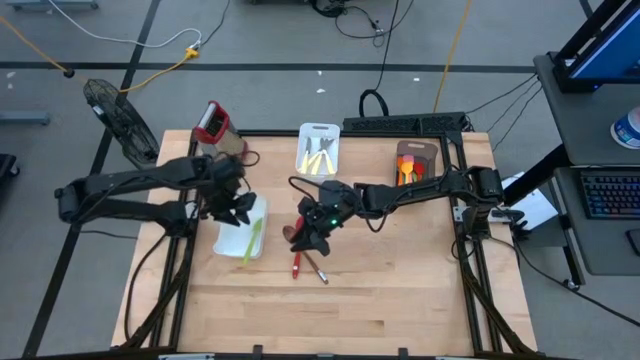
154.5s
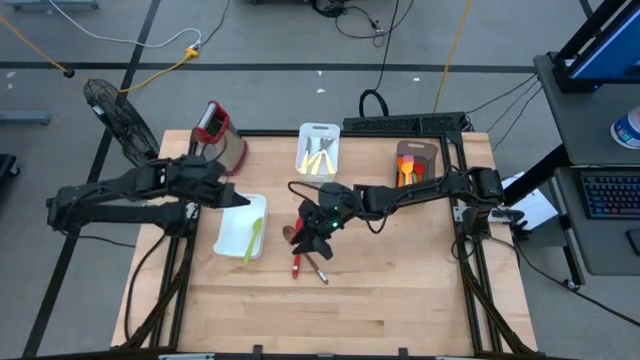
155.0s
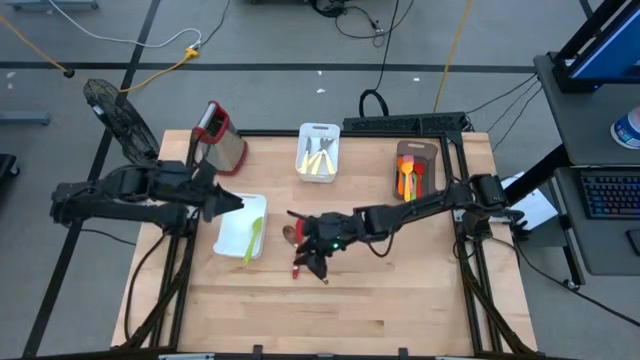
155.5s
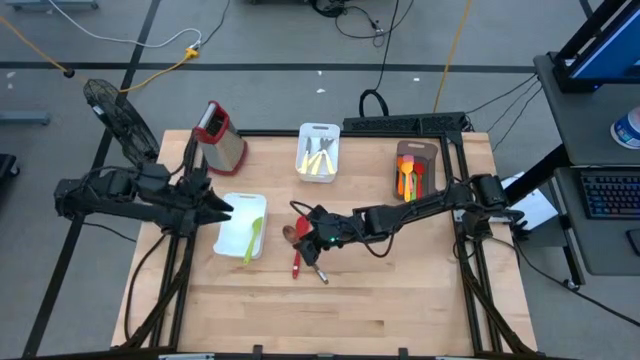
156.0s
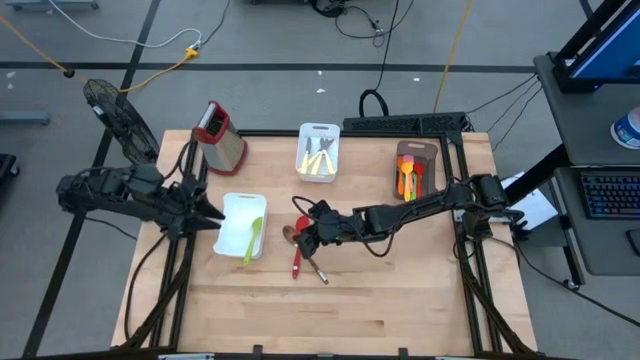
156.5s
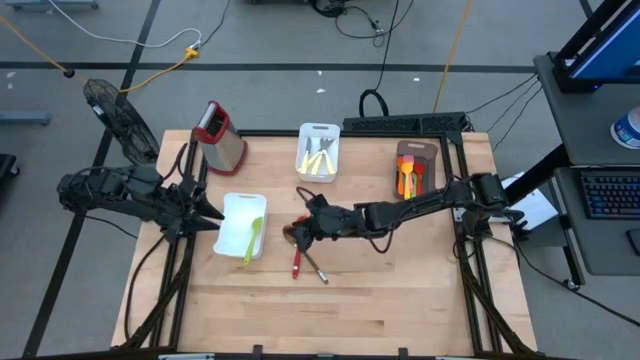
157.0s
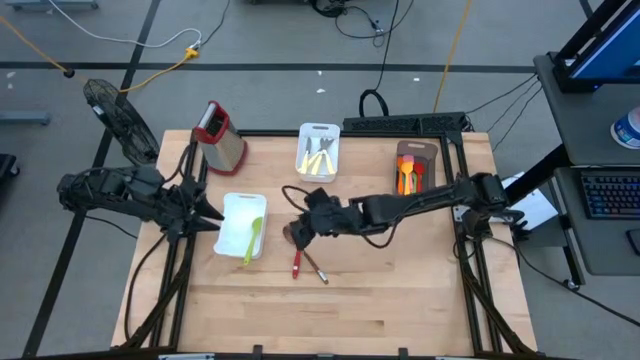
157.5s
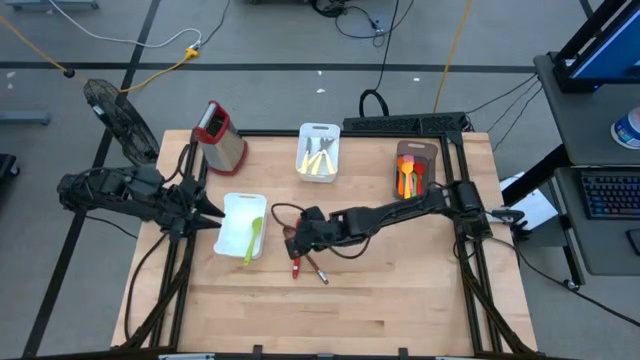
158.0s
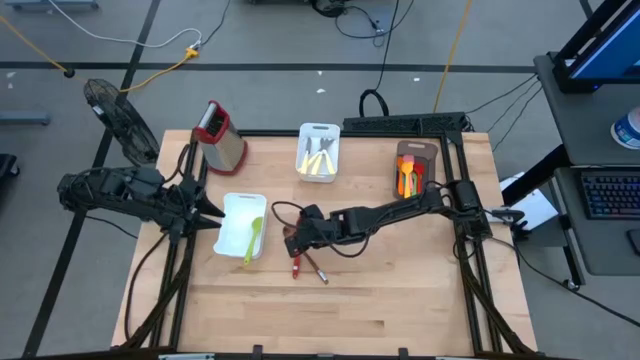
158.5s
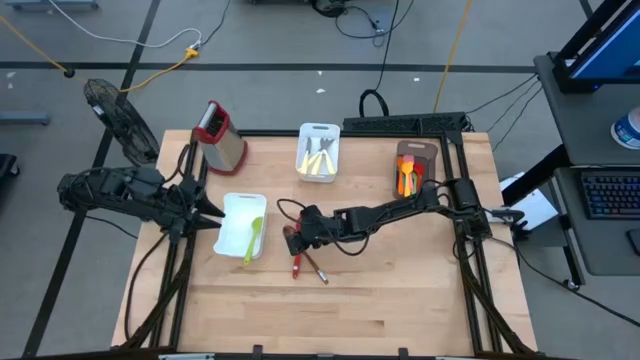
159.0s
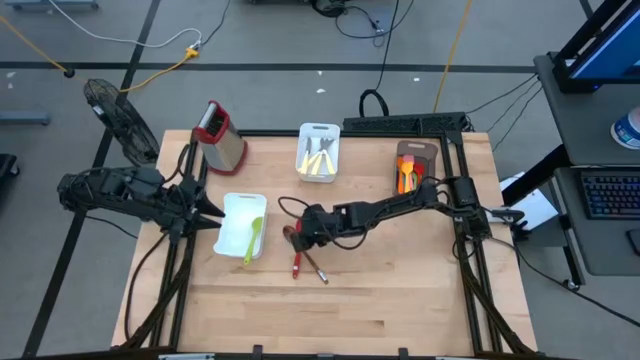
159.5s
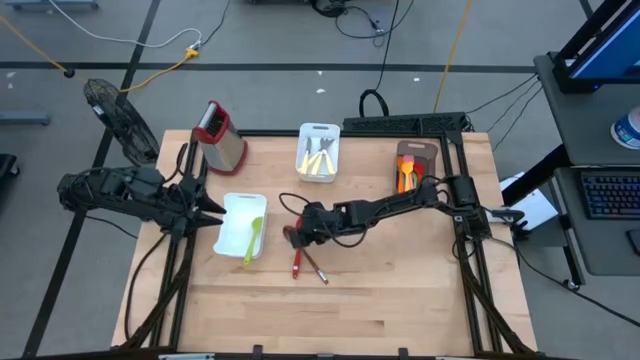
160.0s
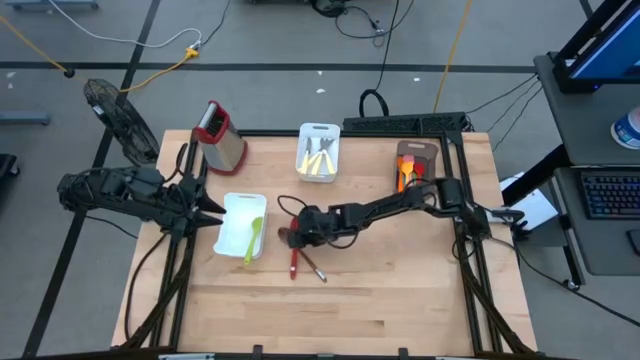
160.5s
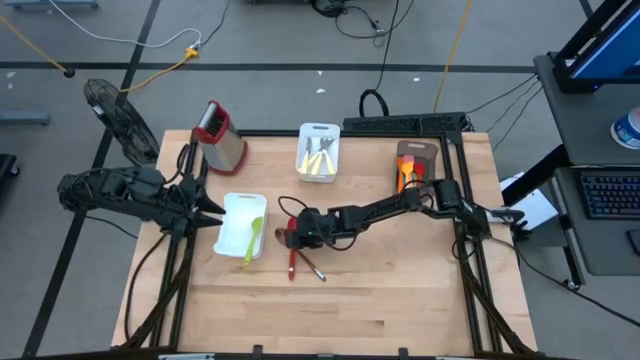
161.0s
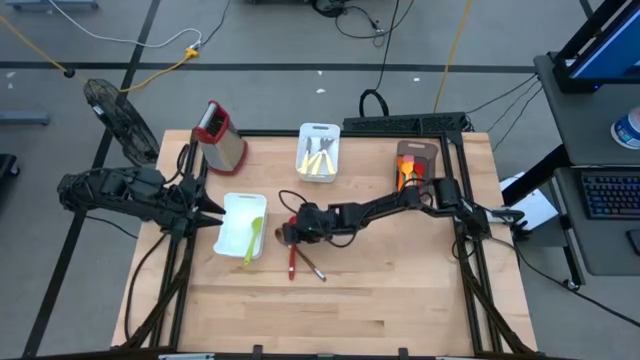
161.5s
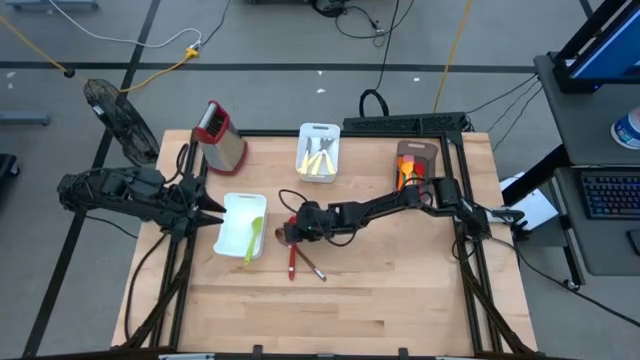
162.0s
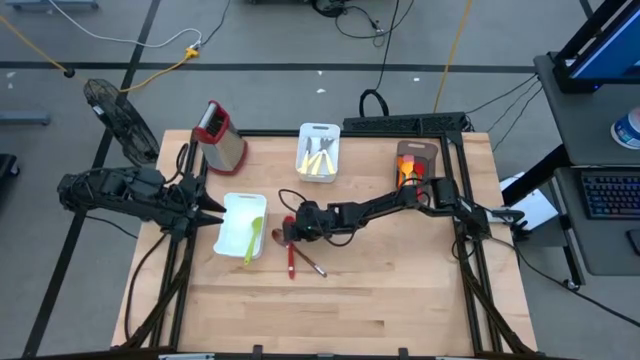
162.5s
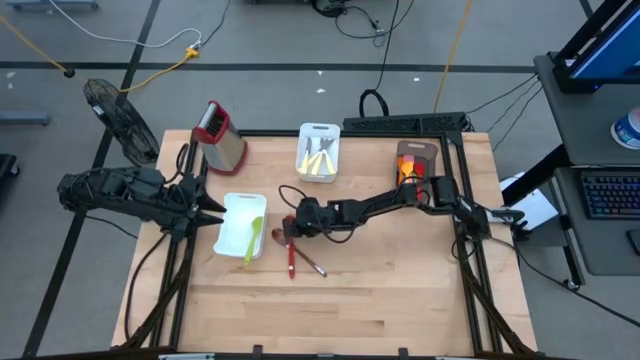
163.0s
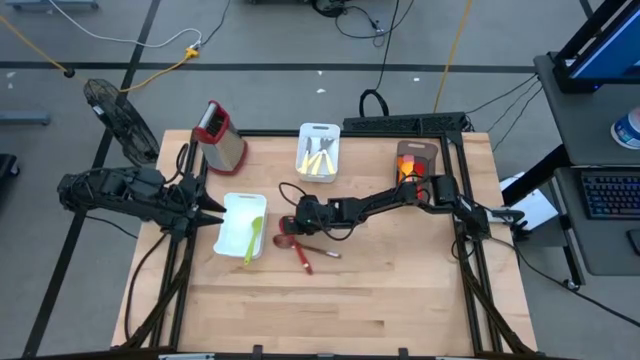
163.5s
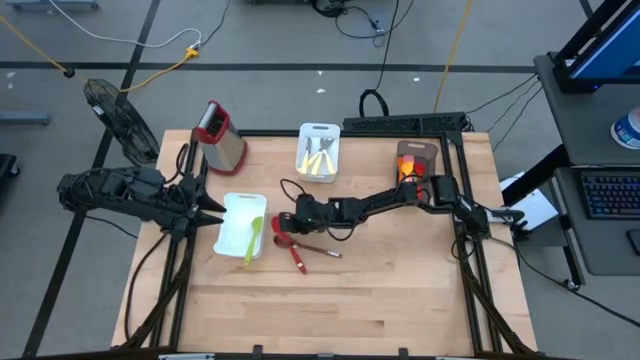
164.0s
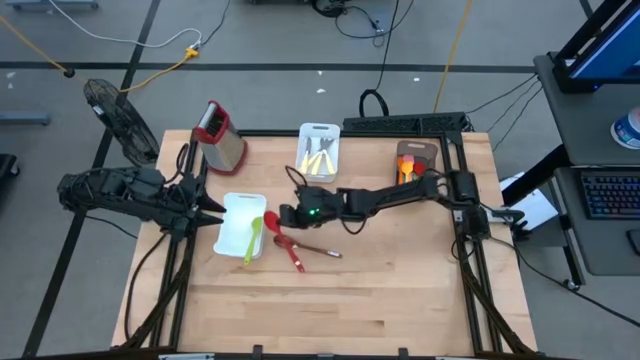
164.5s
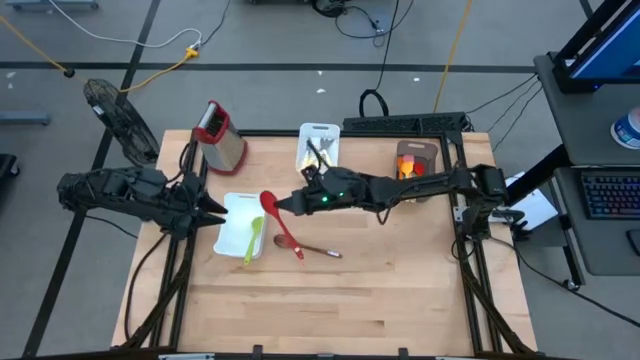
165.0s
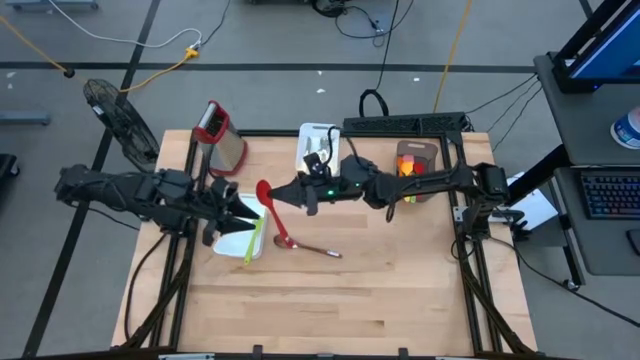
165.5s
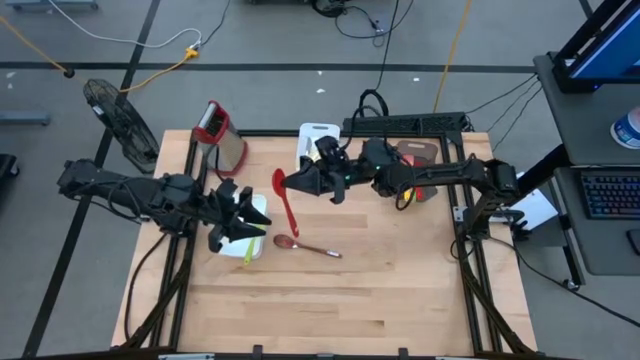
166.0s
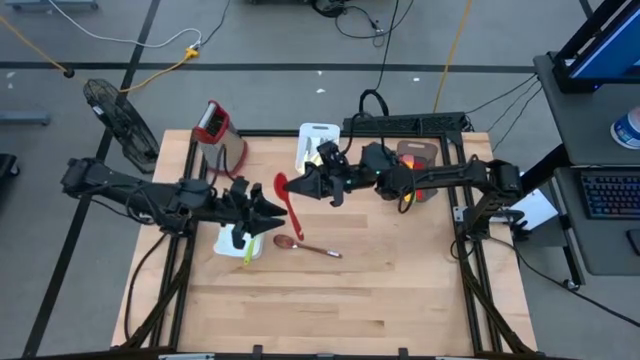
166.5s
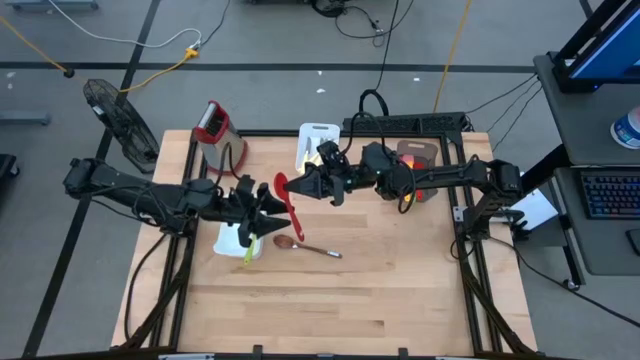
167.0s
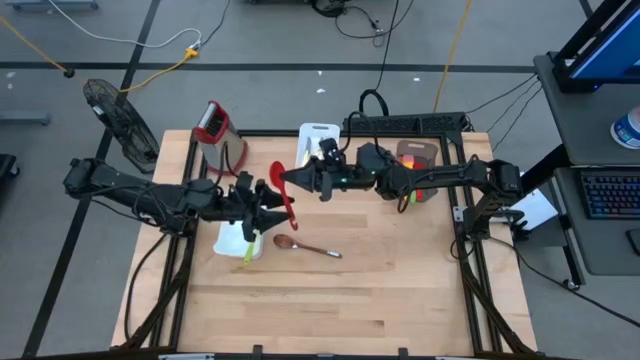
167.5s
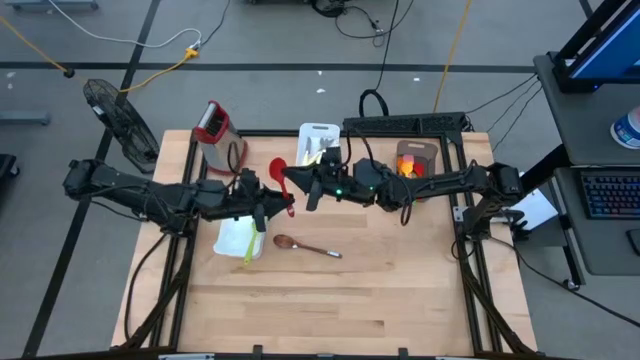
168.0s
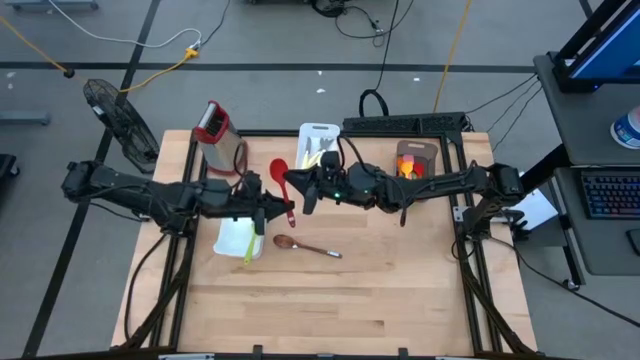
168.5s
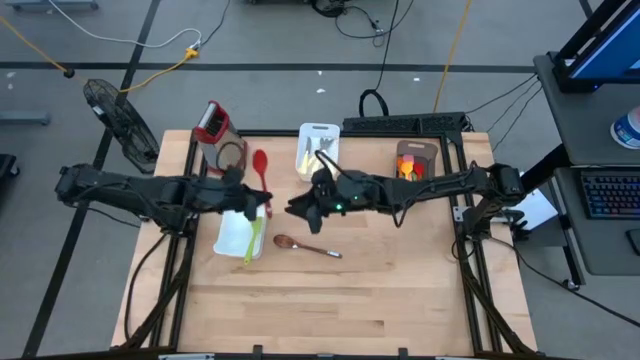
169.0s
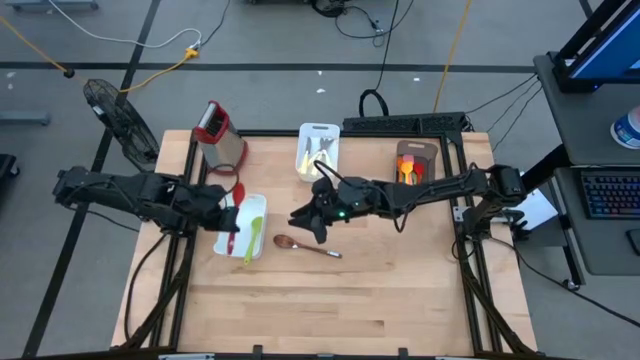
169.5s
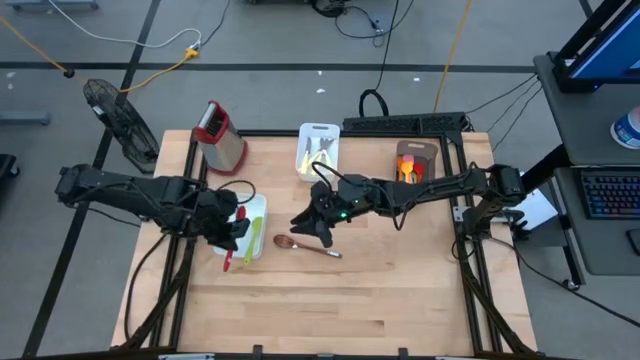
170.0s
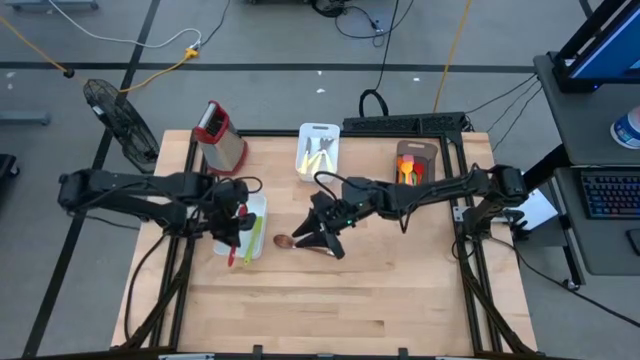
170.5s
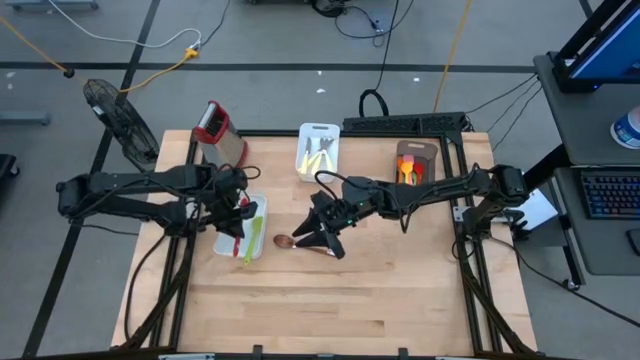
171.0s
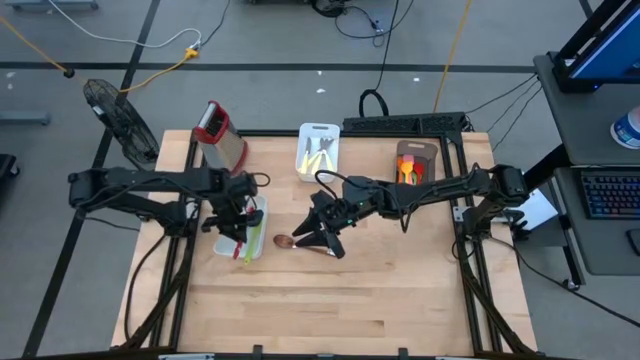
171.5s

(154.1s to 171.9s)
Task: Pick & Place Kitchen Items
Put the red serving spoon into the bottom white bin

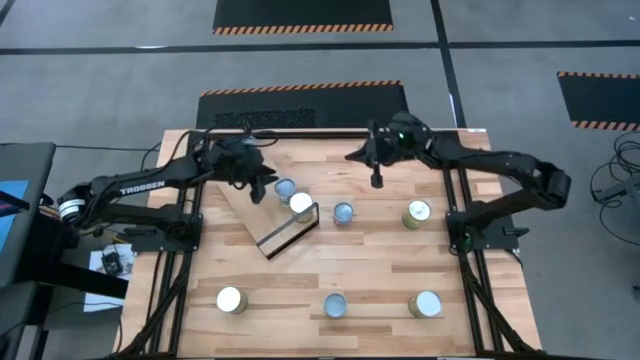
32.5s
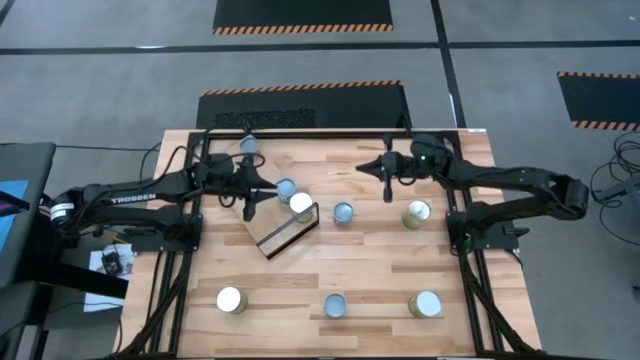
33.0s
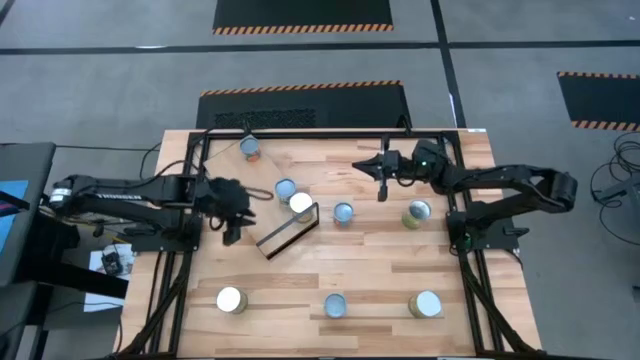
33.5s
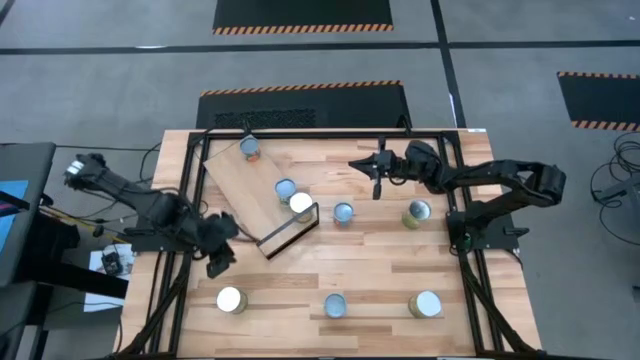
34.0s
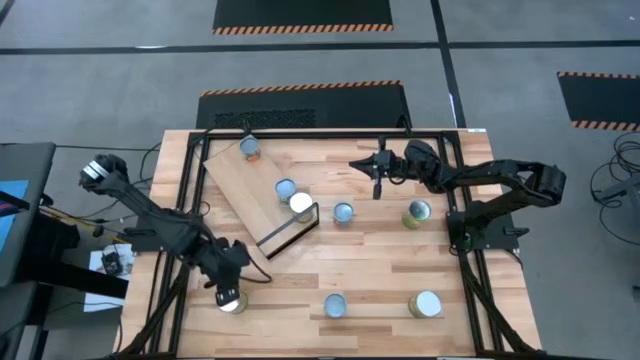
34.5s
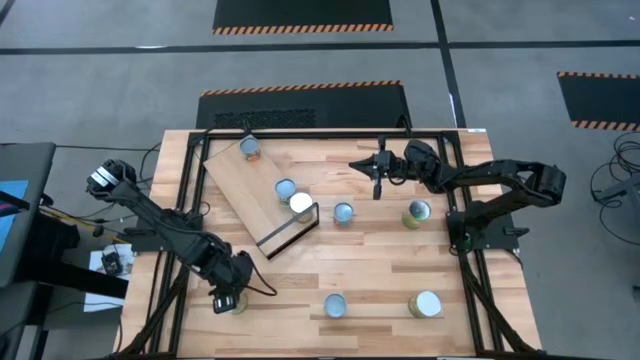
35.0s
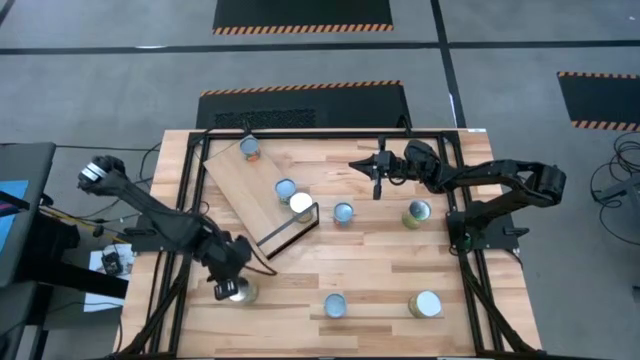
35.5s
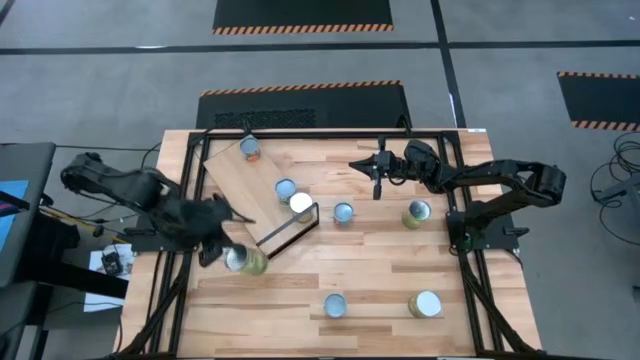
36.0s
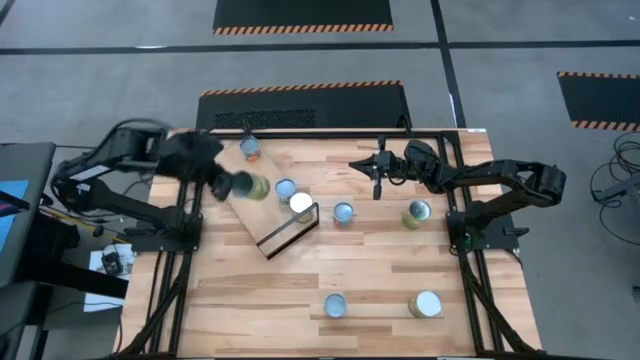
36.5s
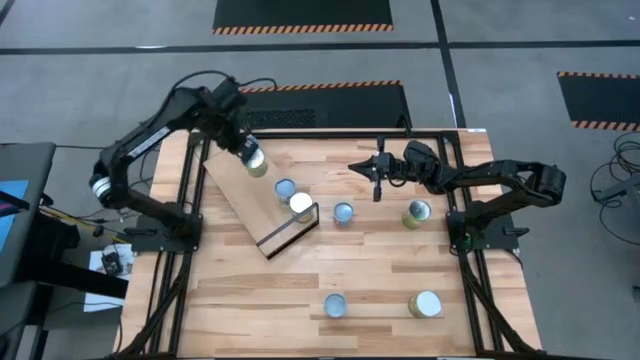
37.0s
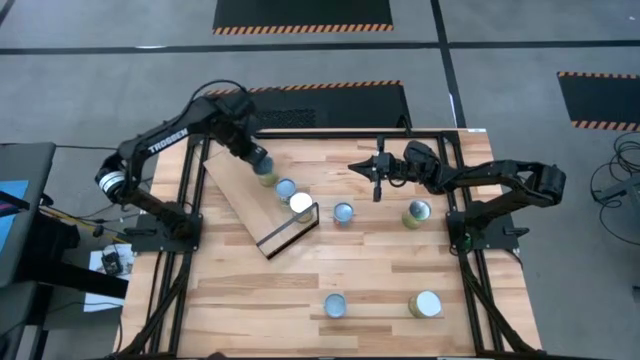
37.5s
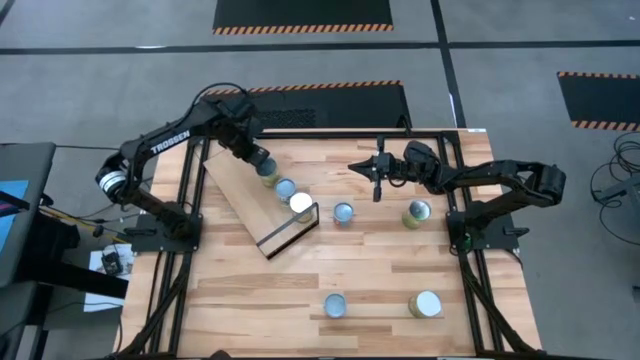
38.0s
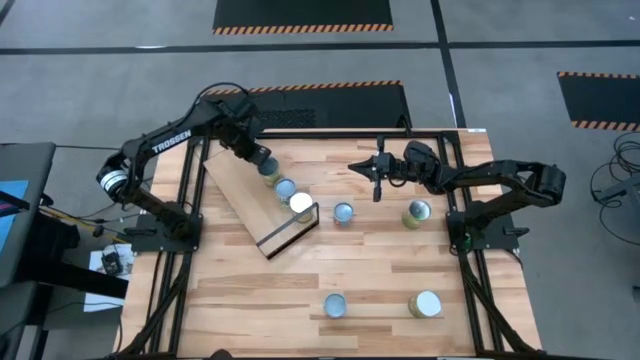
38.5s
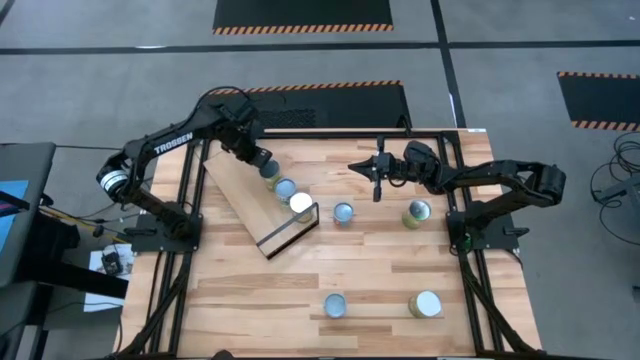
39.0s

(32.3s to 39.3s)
Task: Pick and place cans onto a shelf
Put the left canned pears on the shelf
